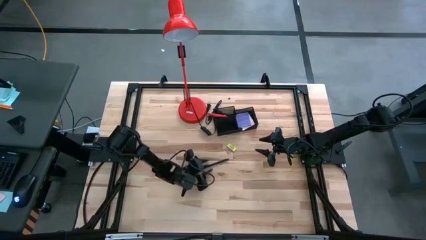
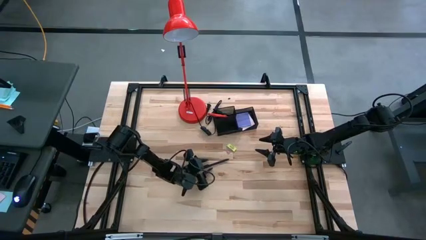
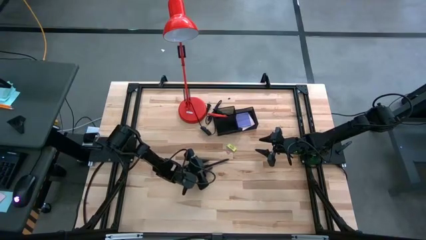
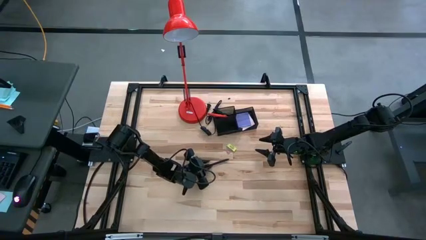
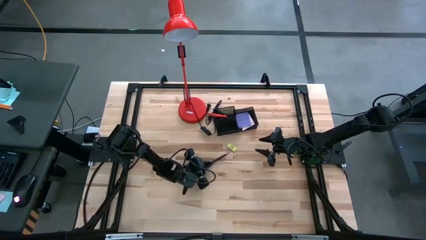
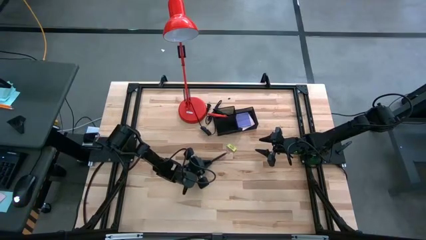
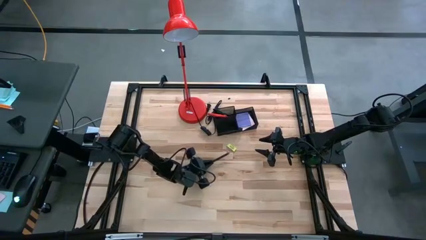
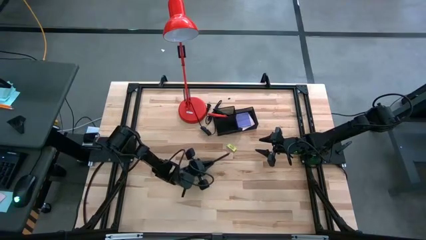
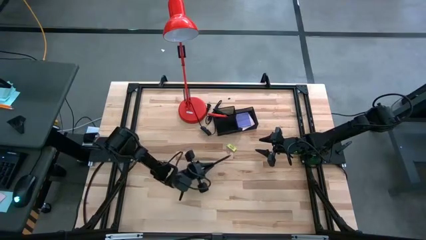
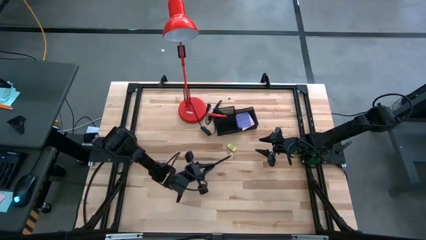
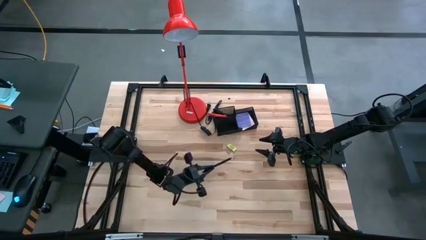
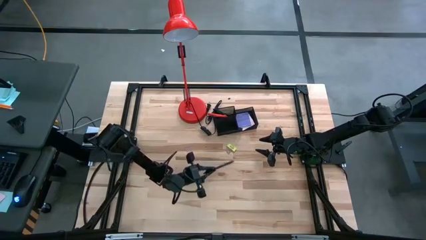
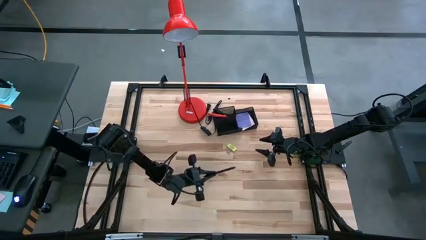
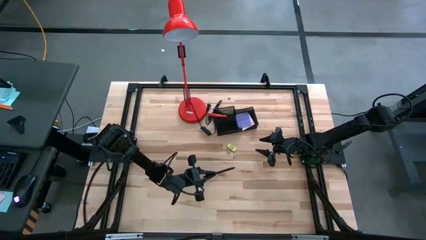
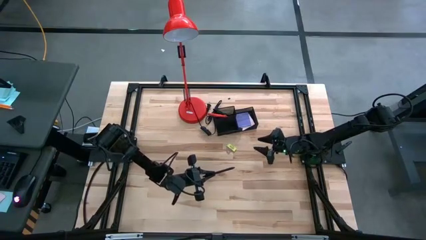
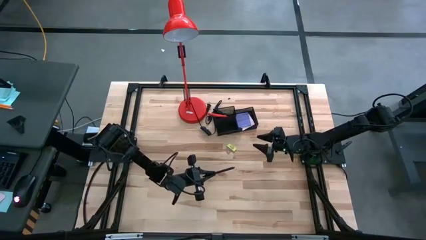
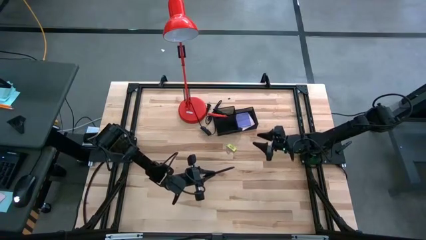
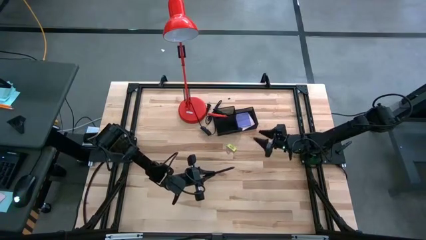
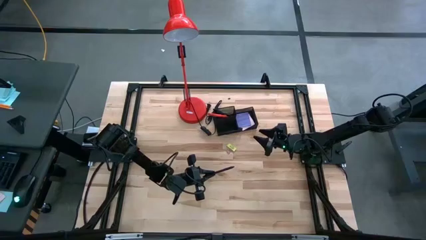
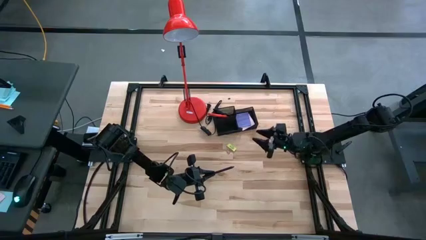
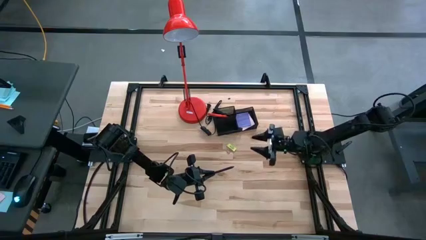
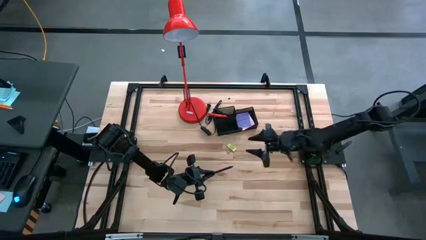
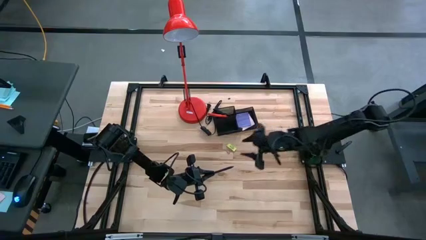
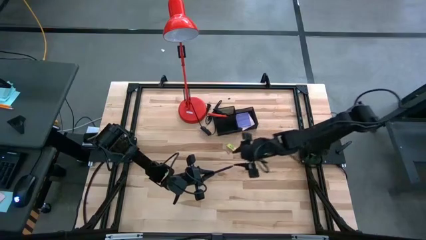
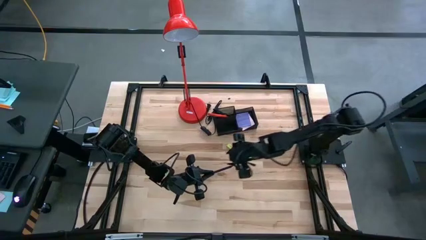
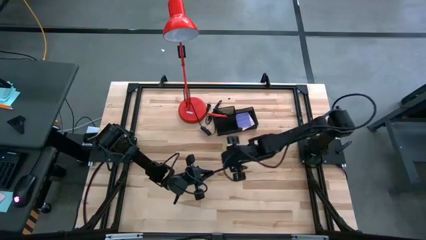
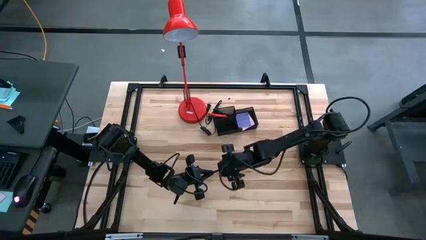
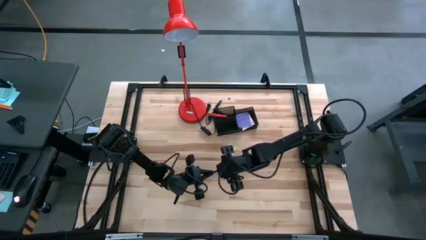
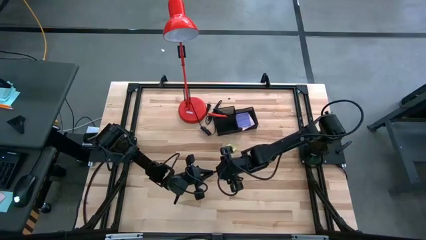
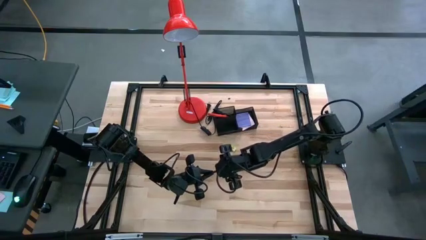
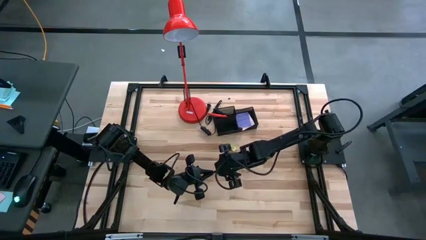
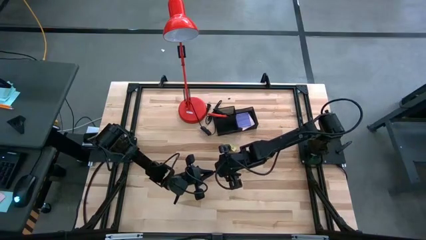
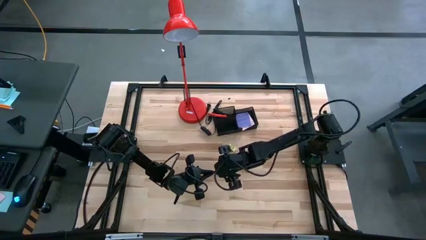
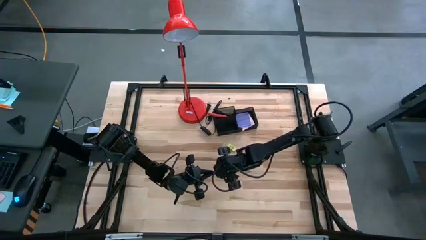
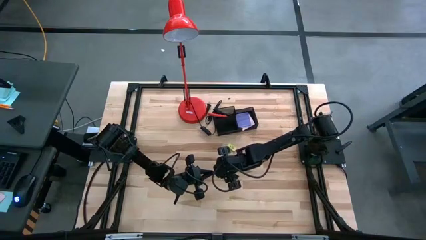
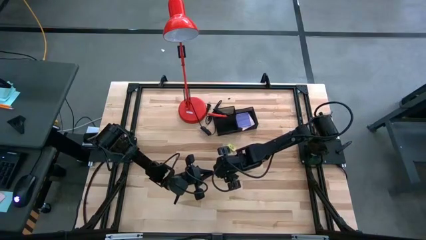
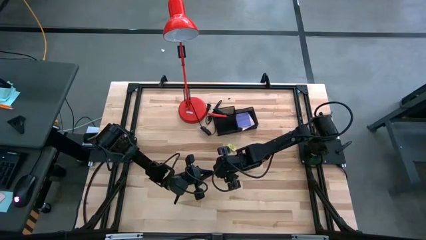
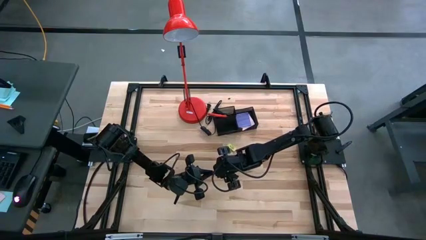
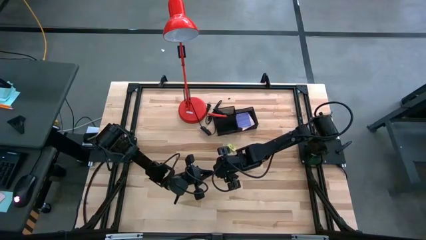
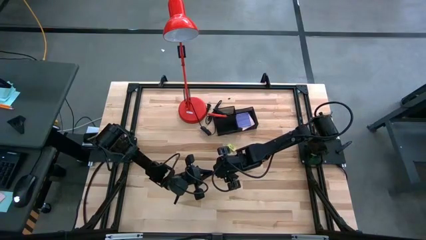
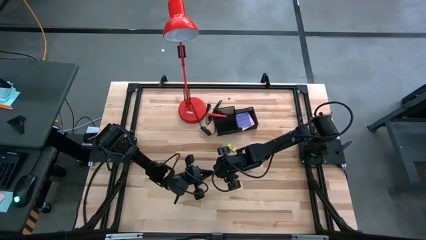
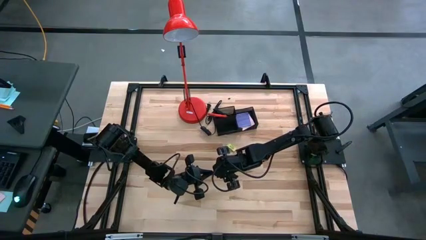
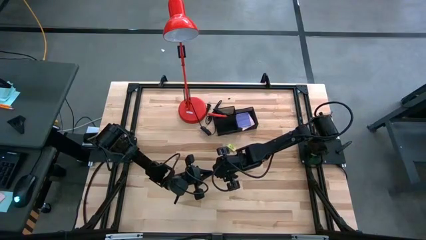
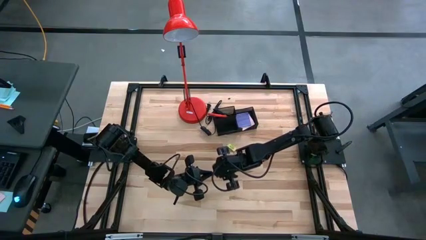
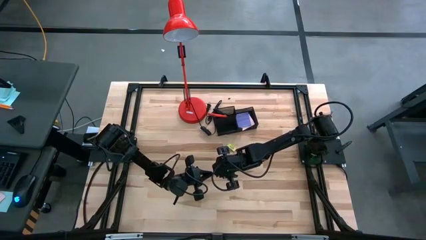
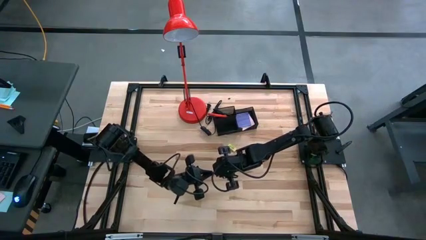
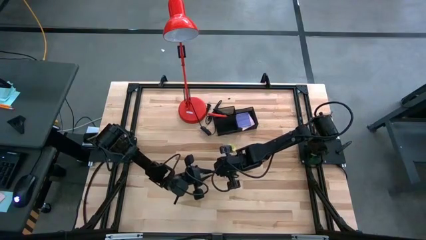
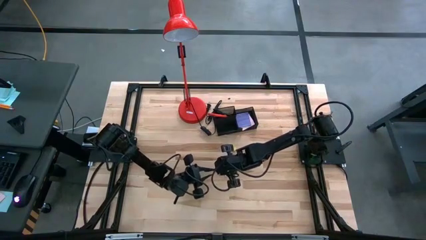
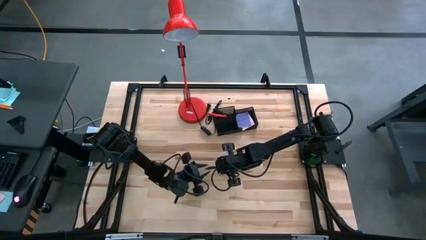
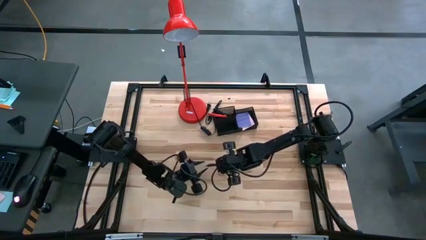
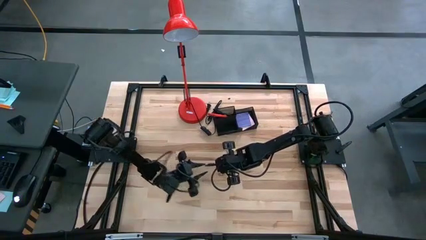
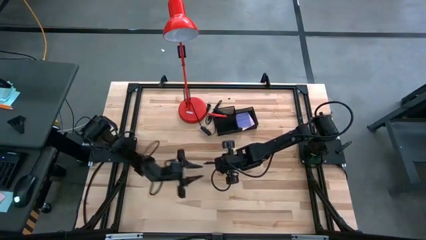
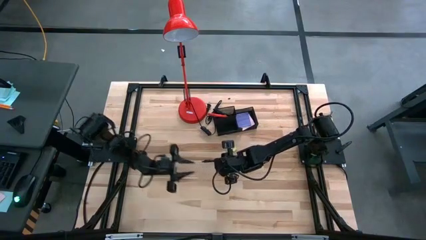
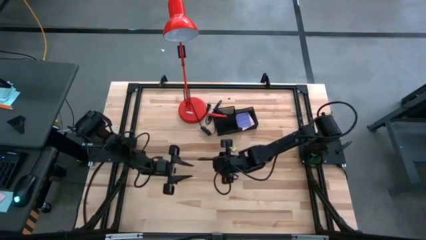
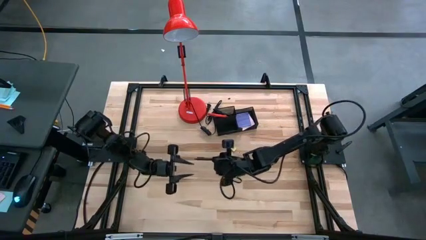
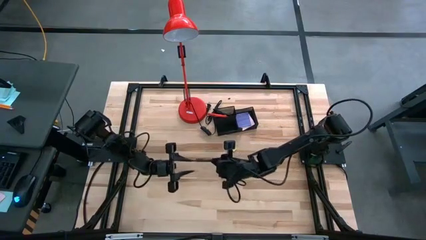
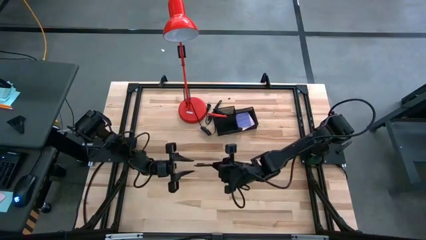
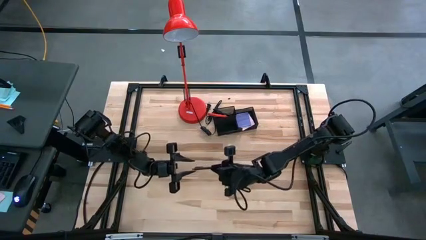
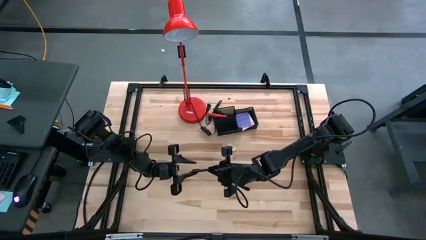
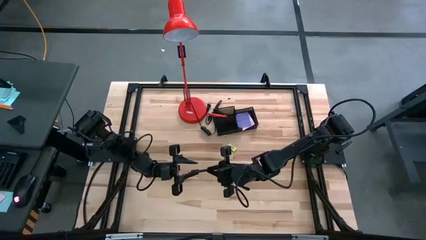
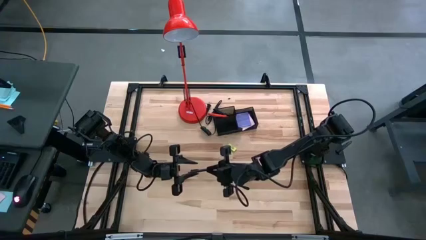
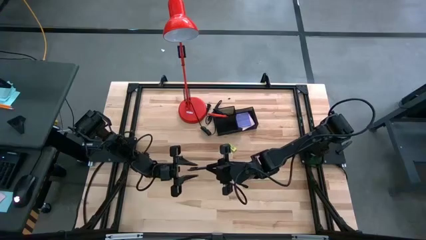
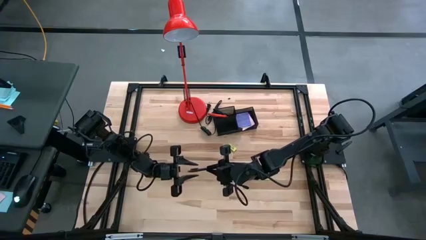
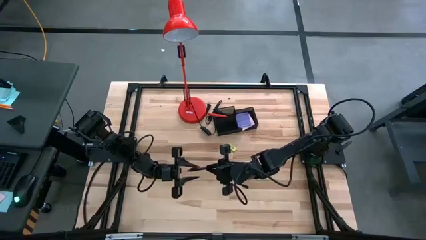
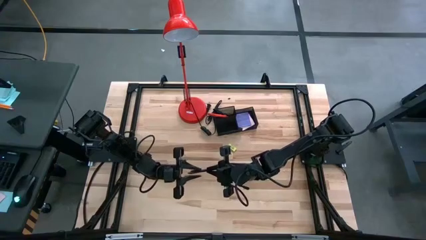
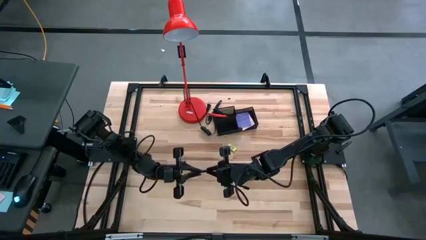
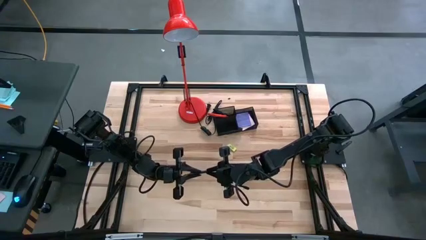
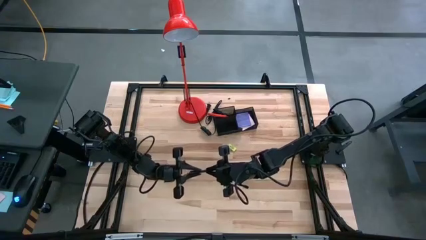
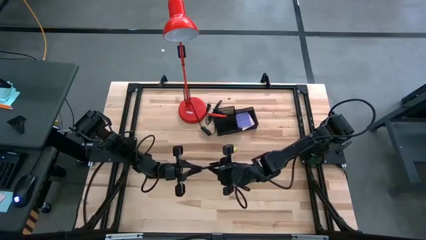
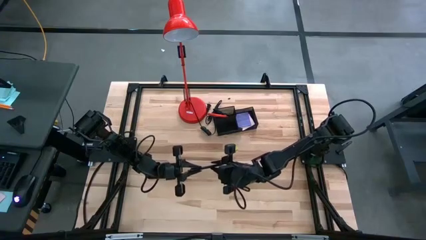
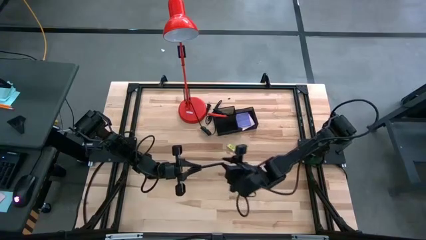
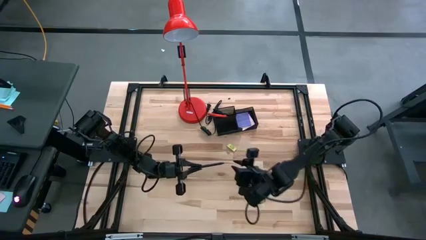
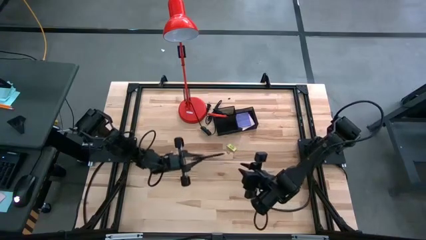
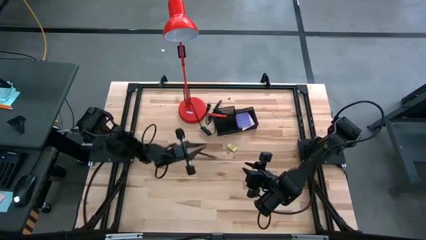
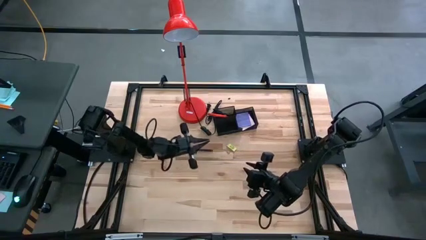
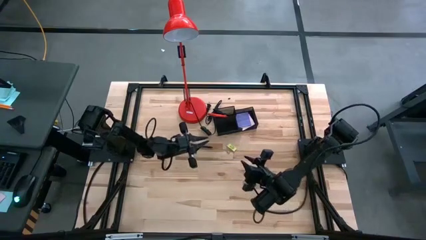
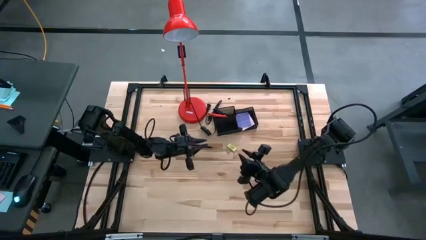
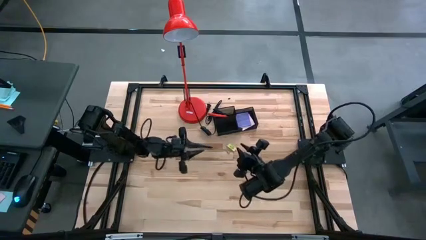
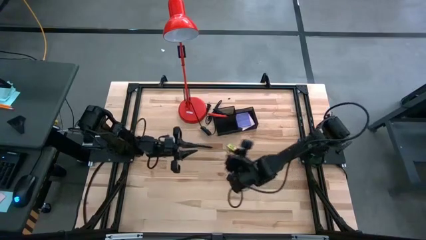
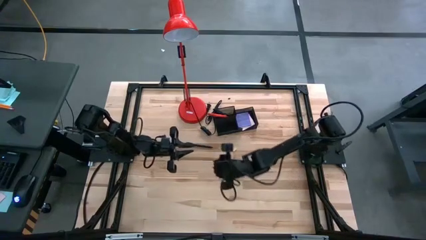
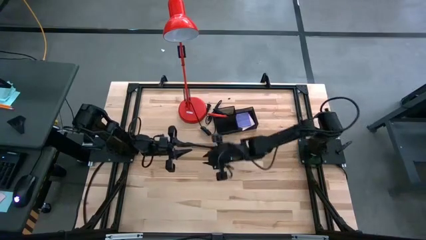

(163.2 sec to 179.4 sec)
Task: Pick and place office supplies into organizer
Put the black pen into the black desk organizer
